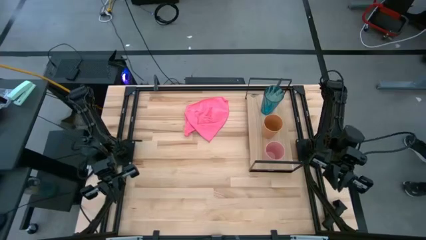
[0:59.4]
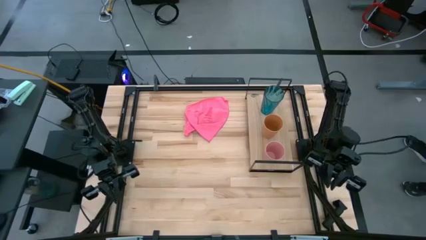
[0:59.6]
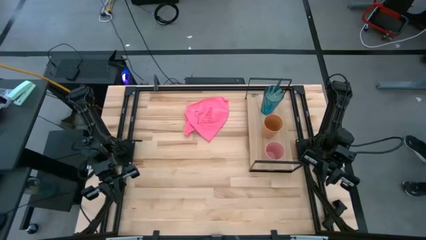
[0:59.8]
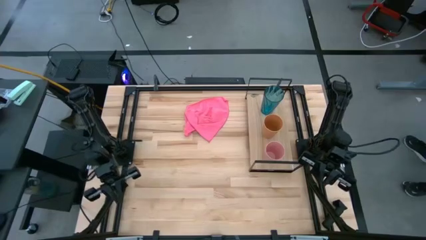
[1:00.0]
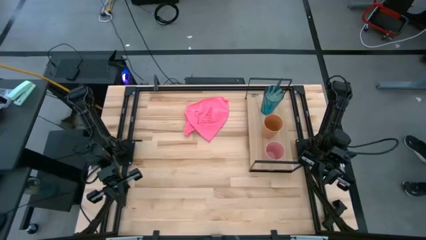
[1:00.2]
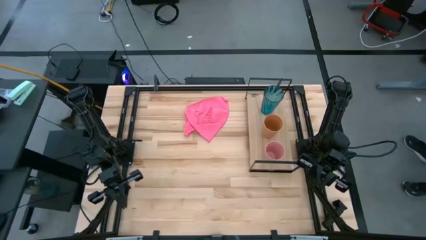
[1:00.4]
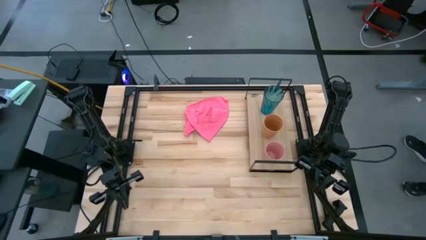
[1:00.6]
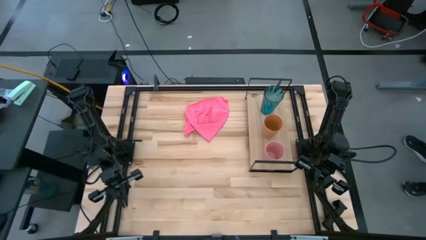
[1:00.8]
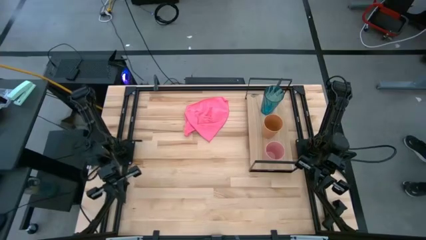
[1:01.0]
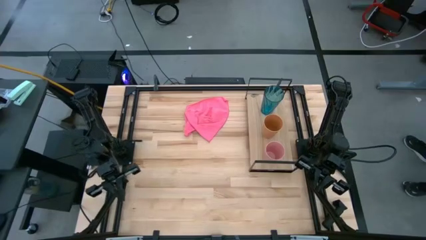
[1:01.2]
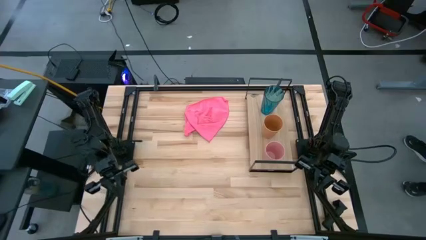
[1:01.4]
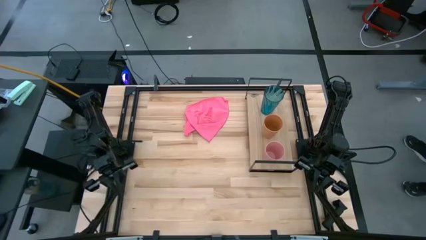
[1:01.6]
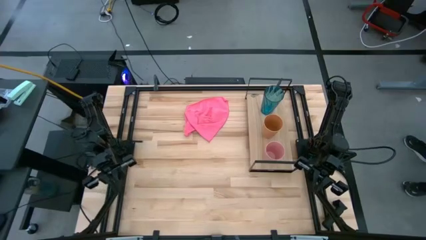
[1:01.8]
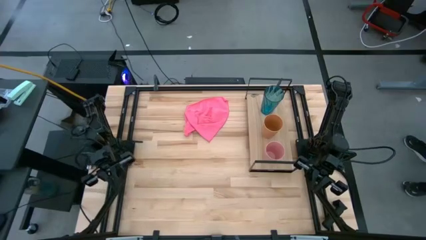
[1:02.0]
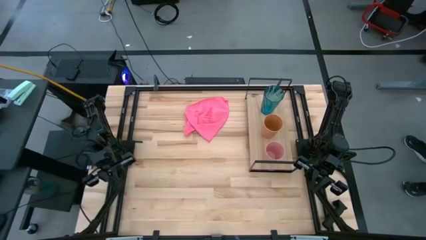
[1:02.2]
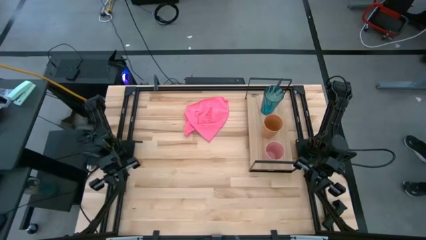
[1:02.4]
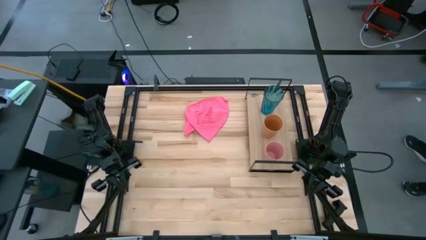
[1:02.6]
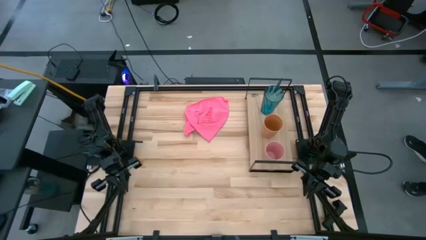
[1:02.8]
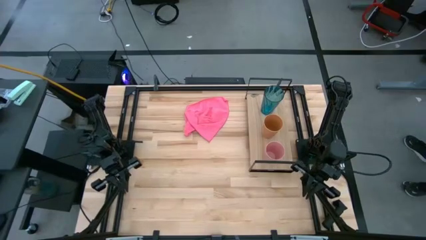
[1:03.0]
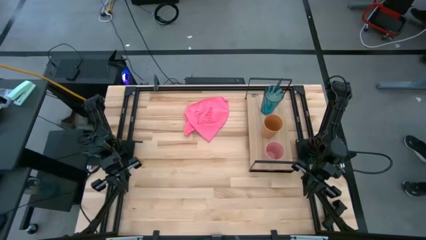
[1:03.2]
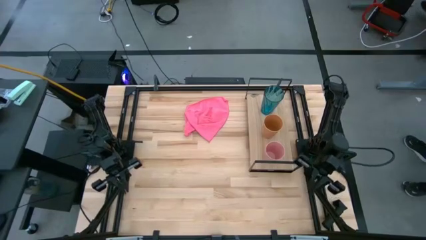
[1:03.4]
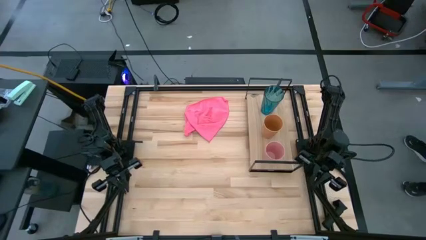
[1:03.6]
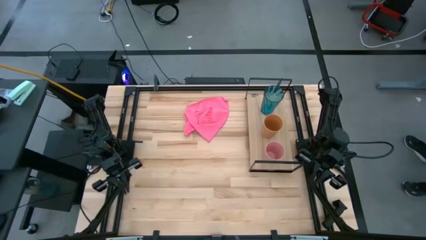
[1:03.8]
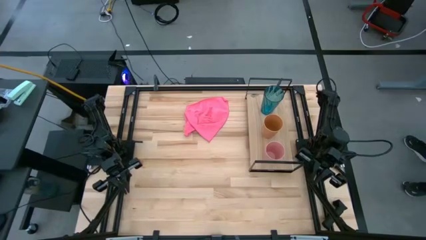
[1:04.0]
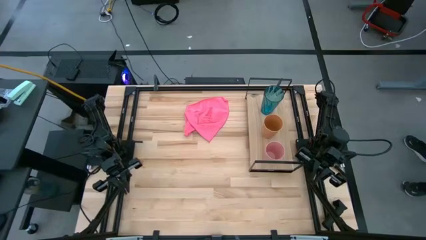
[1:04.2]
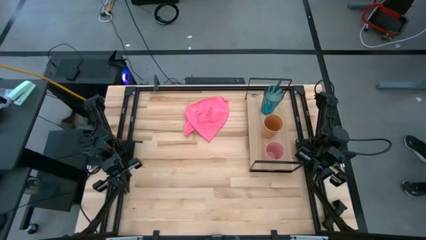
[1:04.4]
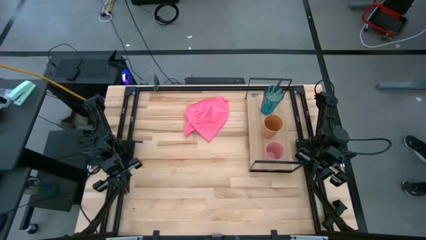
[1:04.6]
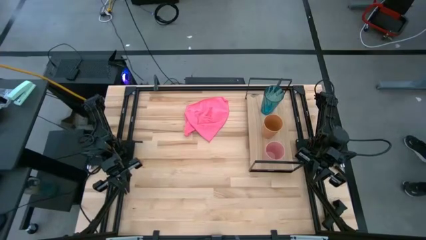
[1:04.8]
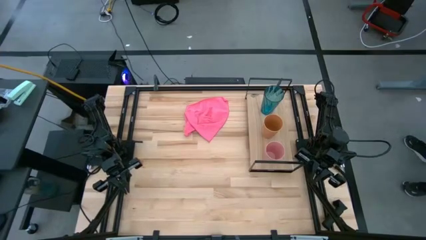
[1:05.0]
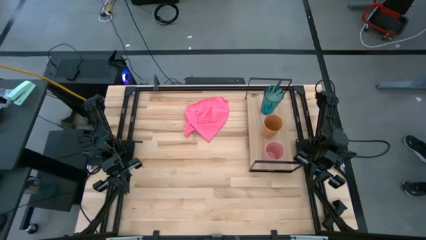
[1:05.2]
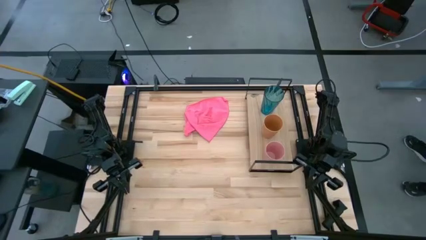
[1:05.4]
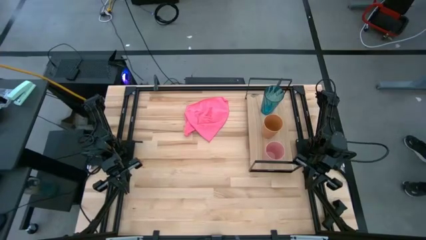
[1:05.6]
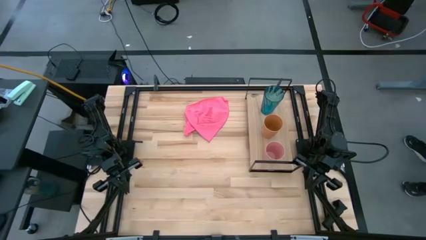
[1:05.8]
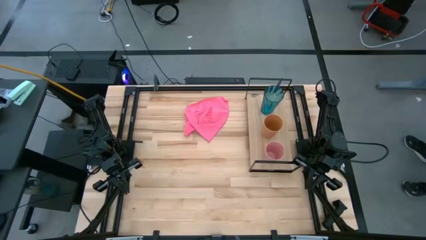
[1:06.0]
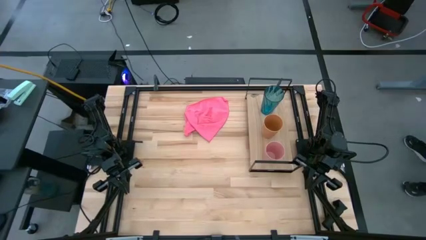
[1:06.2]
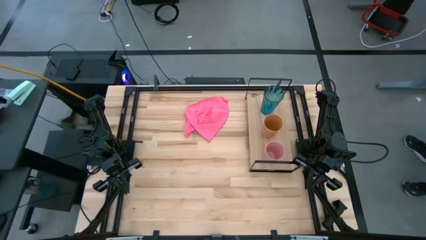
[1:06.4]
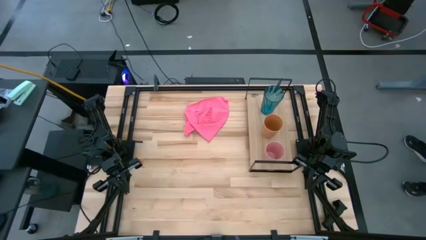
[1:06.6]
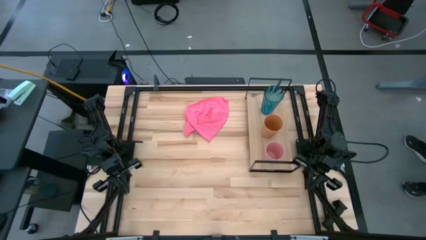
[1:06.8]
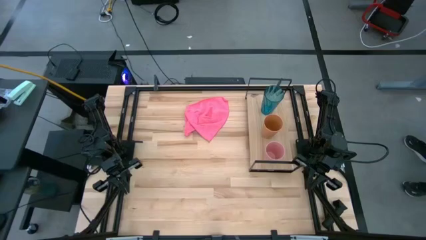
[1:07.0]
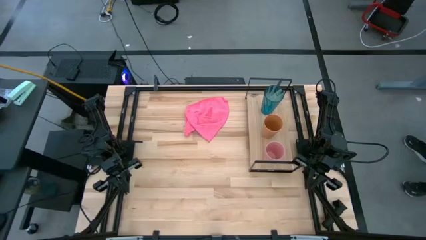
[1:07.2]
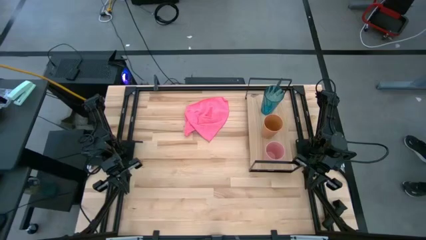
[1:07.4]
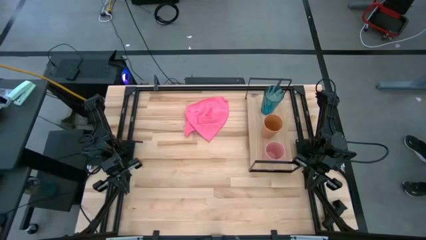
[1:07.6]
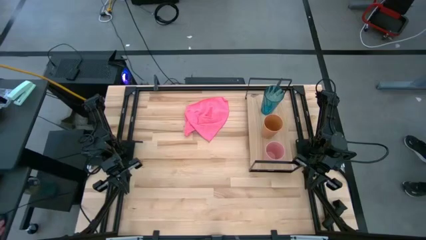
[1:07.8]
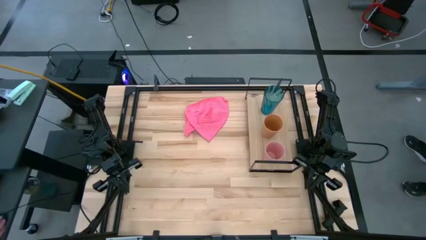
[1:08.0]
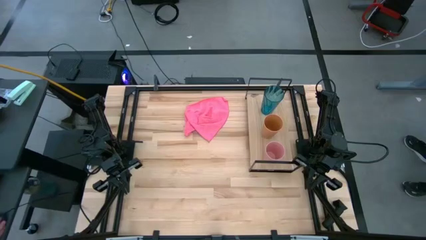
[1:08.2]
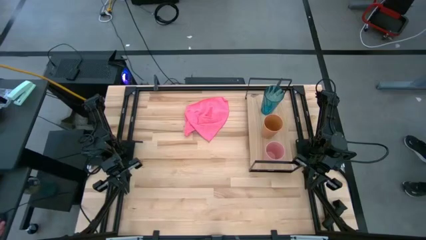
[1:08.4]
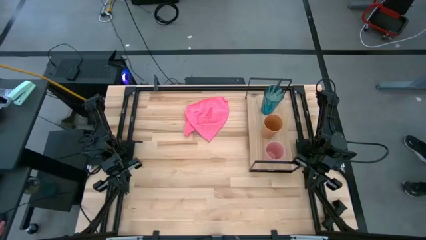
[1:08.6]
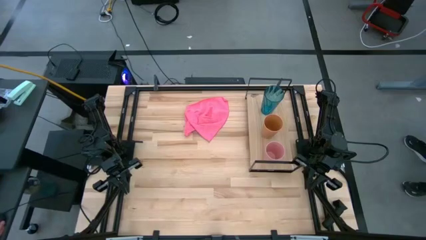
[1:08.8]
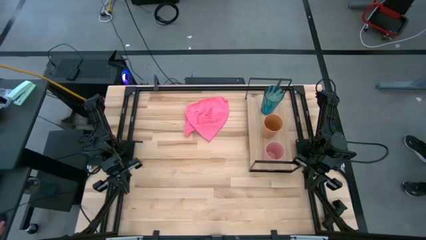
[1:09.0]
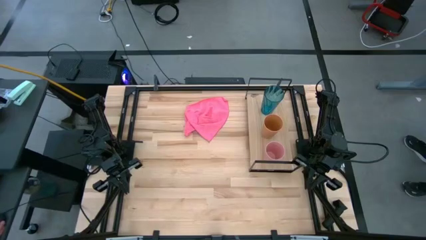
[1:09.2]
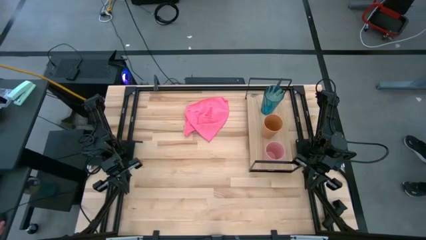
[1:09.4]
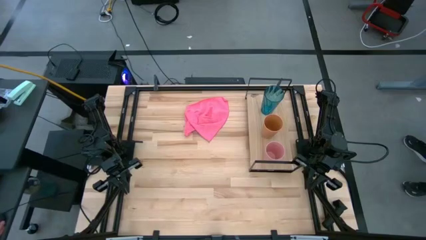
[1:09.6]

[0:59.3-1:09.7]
Task: Stack small to large cups/mugs on shelf
Return to Home Position

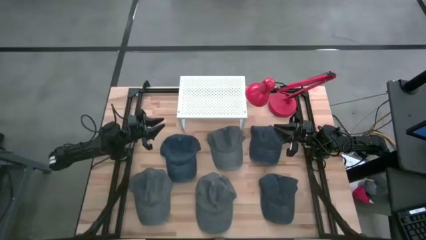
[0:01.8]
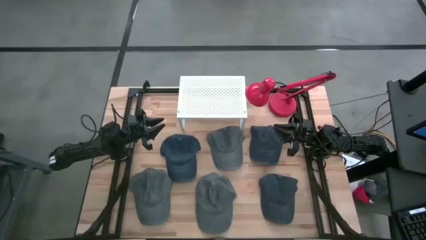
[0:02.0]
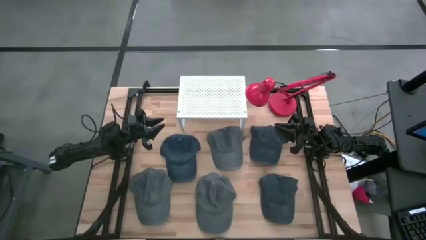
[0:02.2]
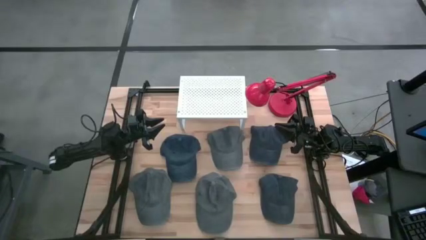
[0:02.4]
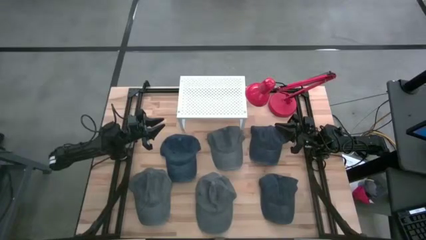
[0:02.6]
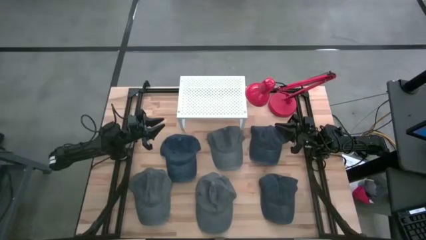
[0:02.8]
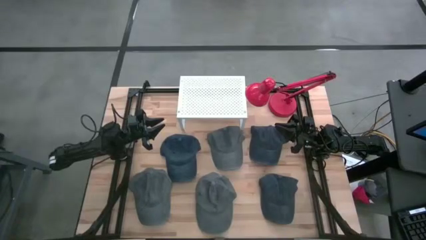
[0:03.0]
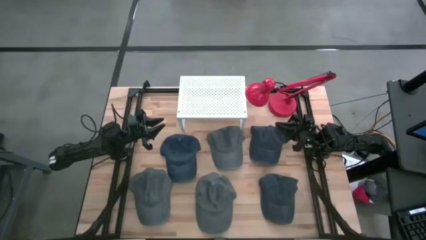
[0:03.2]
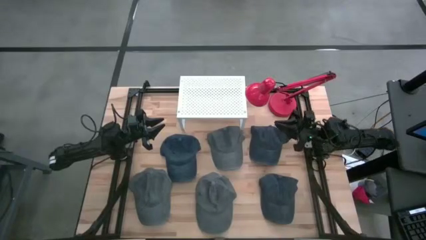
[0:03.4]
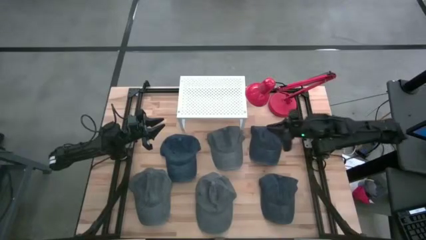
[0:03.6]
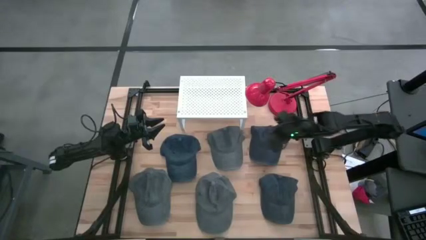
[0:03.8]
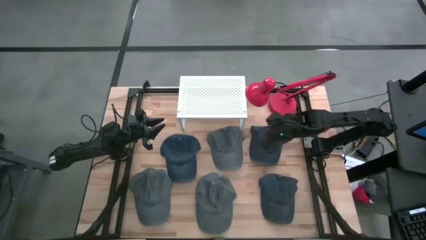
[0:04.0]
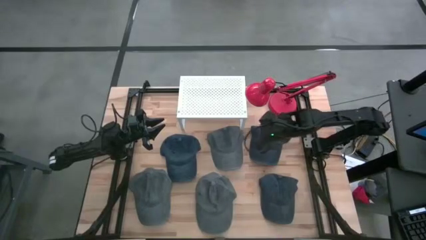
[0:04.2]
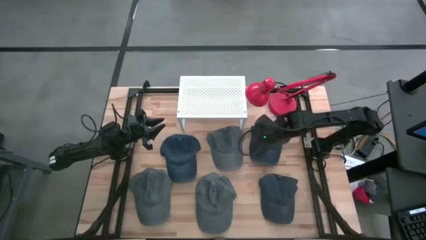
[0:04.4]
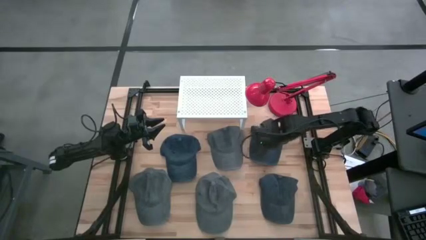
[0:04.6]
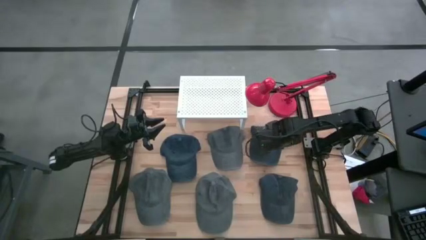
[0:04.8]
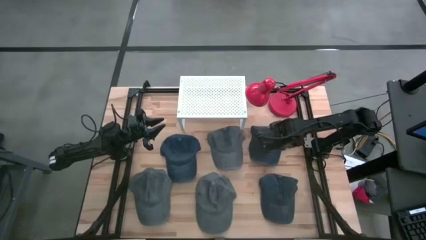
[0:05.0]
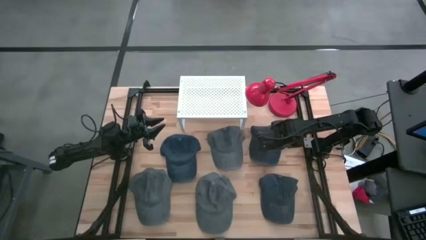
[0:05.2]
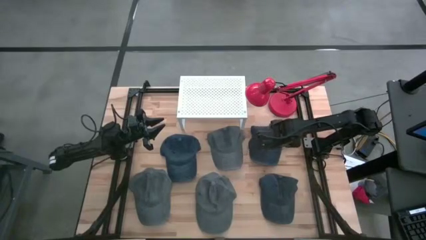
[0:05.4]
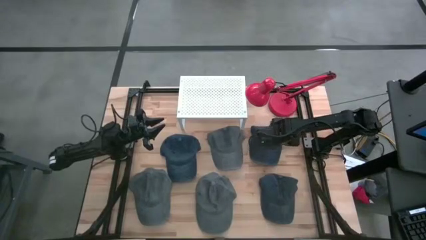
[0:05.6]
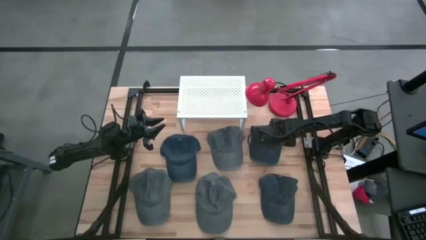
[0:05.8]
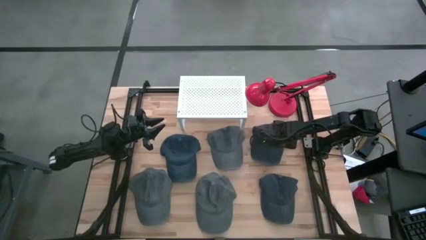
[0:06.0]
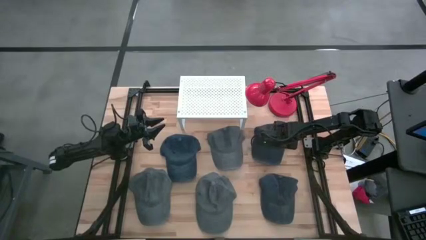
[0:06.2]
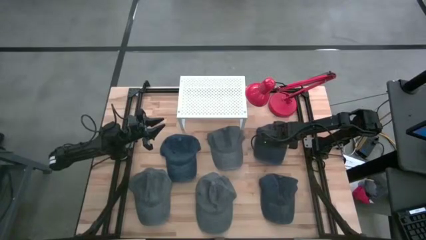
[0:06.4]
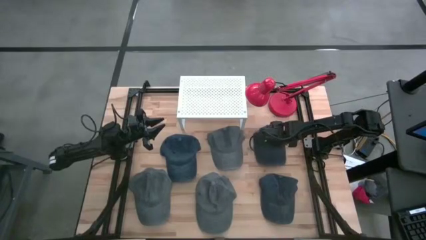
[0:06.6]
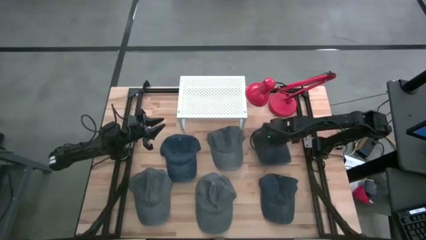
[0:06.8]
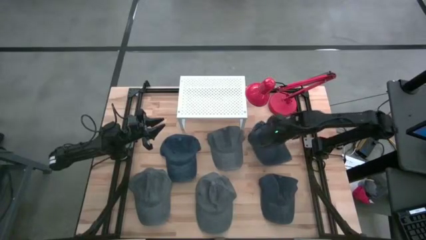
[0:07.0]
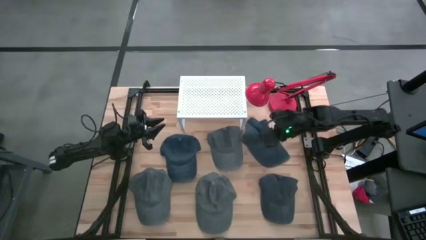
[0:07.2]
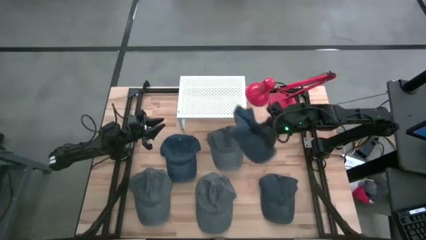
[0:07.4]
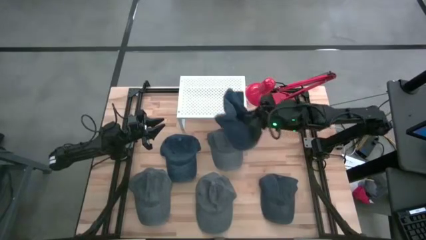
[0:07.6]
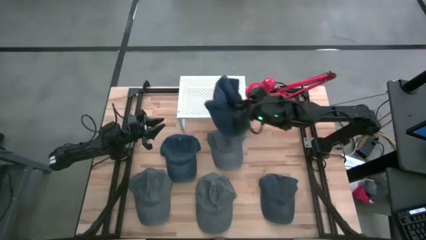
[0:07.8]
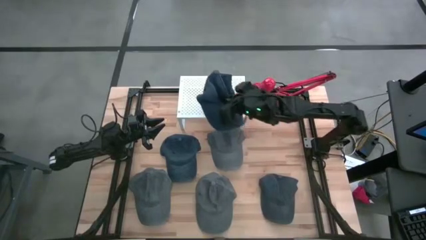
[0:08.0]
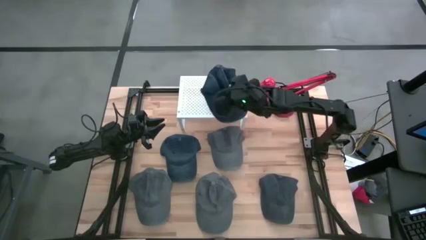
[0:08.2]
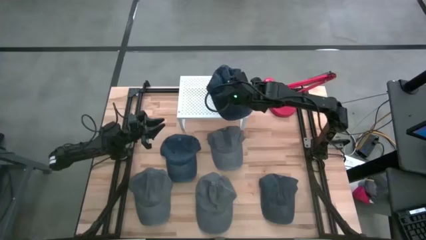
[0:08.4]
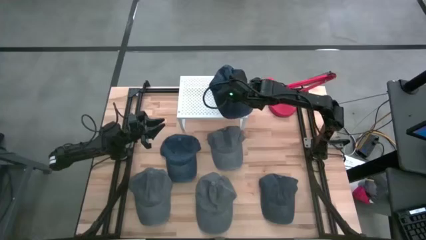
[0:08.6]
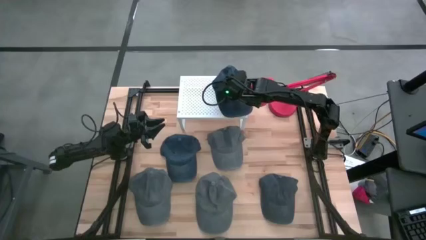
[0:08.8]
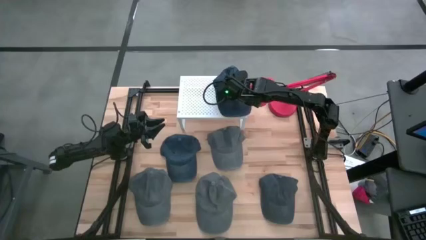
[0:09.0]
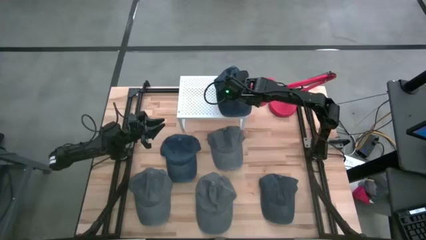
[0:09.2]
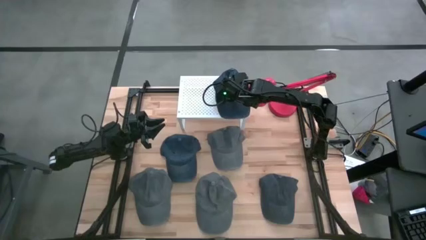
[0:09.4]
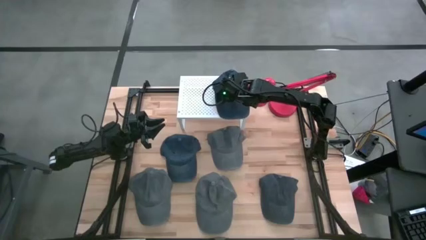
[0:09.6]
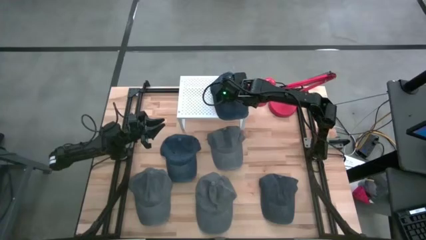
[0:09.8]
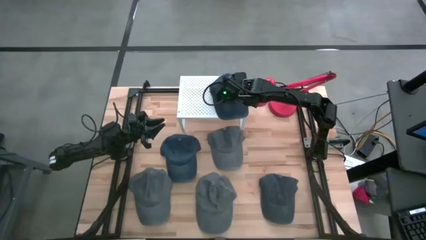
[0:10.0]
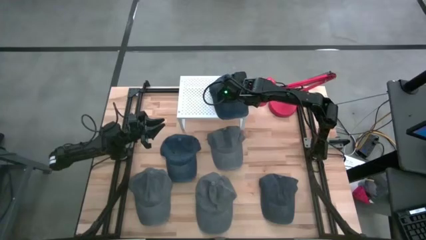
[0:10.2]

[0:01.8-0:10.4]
Task: Pick & Place hat
Put the top right dark gray cap on the shelf
